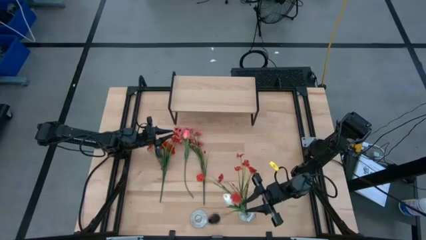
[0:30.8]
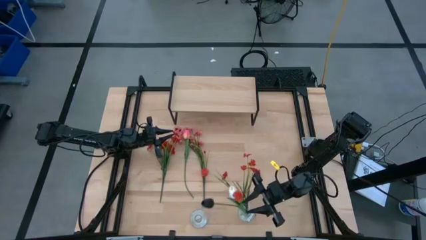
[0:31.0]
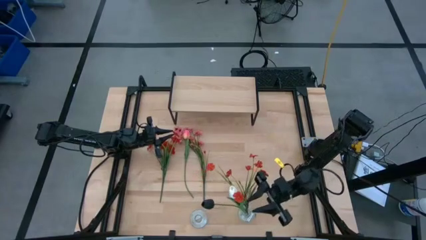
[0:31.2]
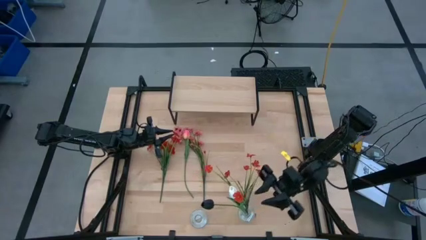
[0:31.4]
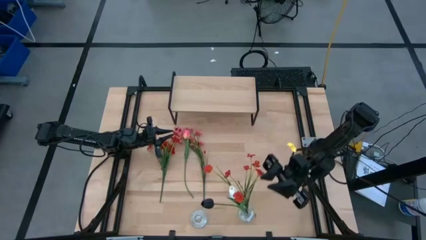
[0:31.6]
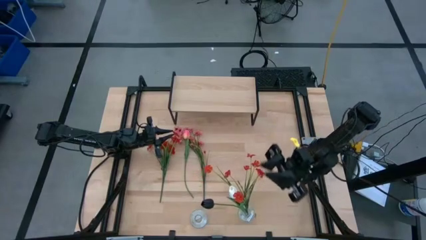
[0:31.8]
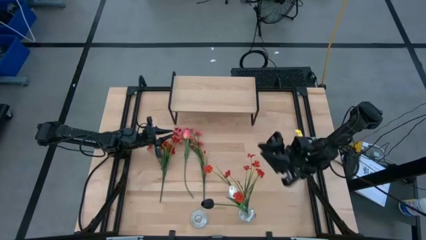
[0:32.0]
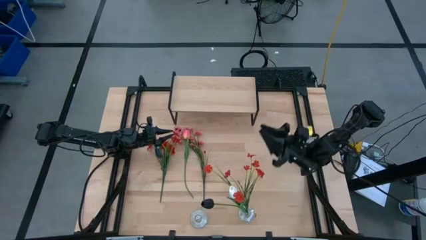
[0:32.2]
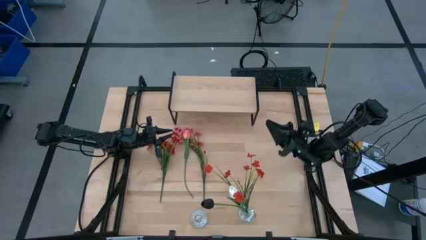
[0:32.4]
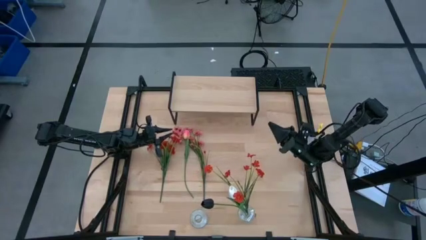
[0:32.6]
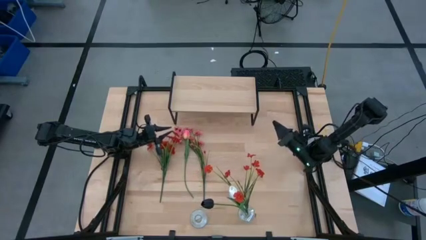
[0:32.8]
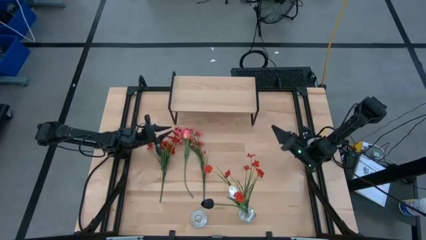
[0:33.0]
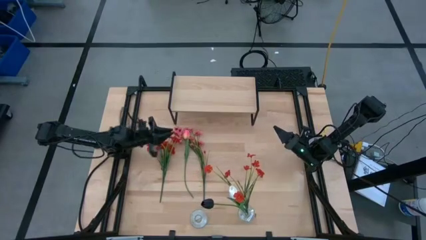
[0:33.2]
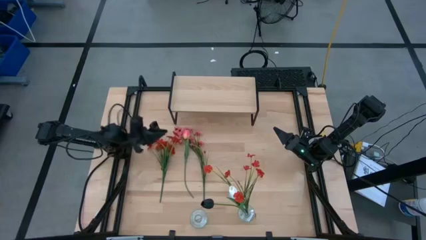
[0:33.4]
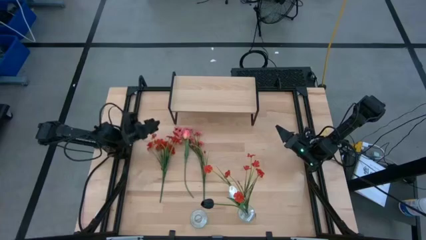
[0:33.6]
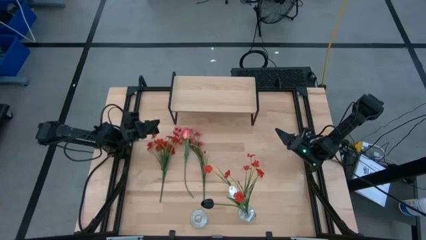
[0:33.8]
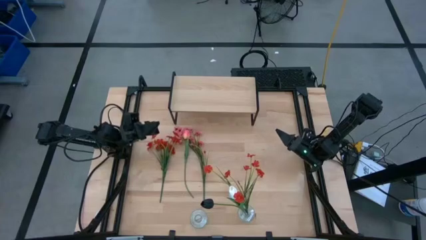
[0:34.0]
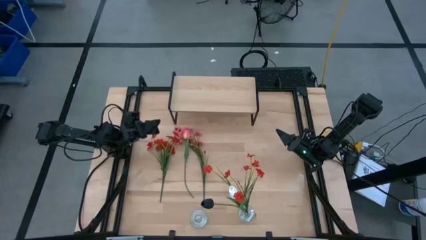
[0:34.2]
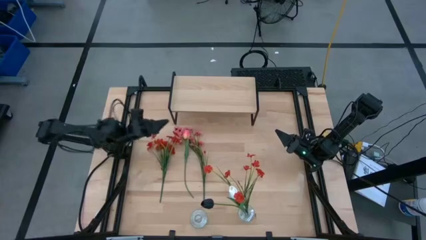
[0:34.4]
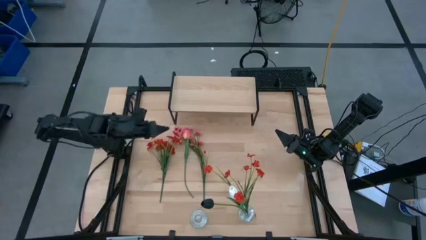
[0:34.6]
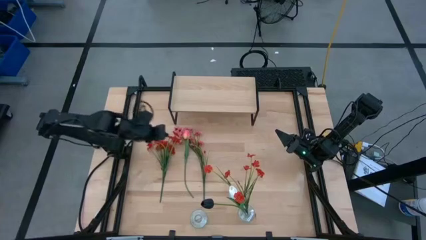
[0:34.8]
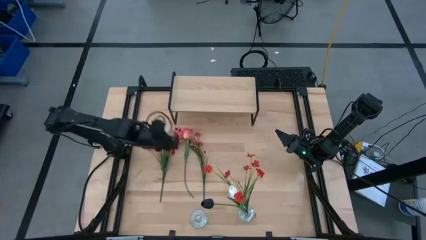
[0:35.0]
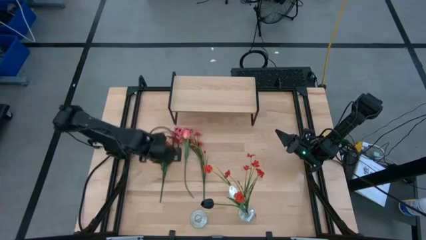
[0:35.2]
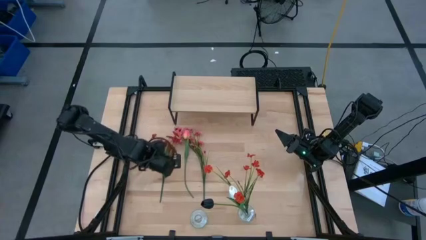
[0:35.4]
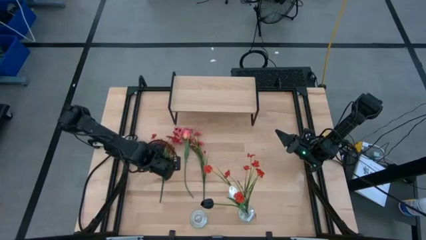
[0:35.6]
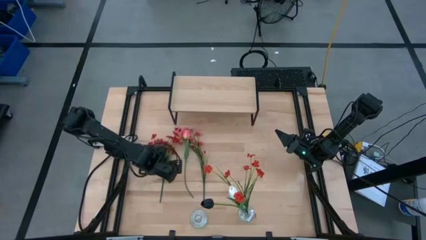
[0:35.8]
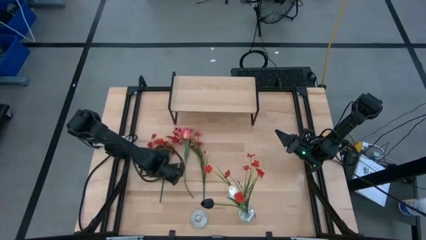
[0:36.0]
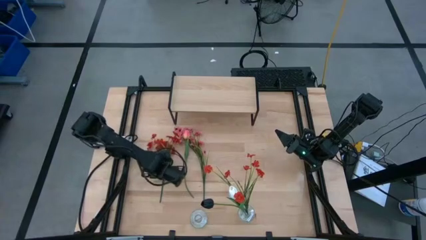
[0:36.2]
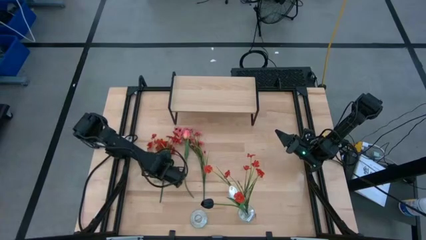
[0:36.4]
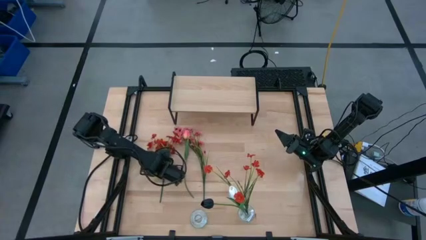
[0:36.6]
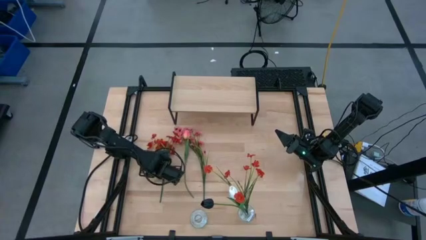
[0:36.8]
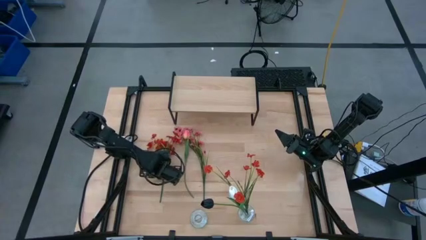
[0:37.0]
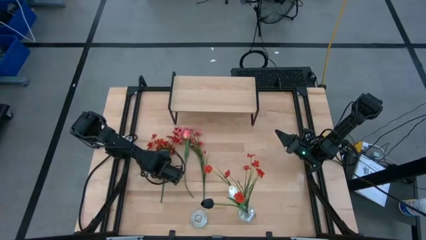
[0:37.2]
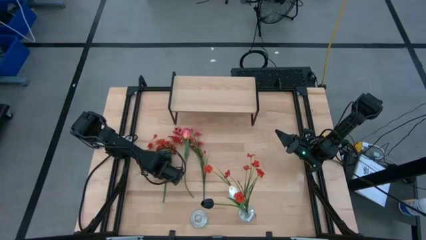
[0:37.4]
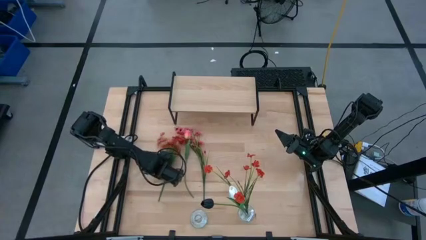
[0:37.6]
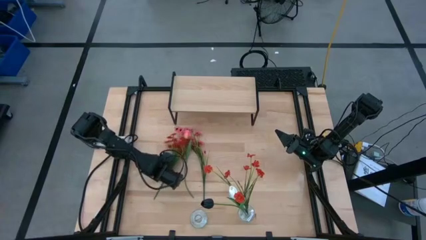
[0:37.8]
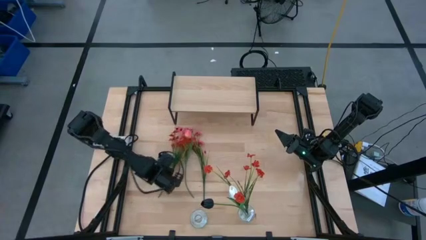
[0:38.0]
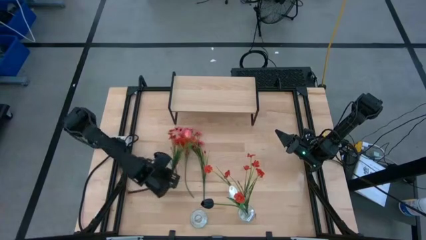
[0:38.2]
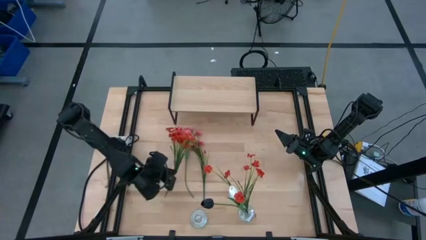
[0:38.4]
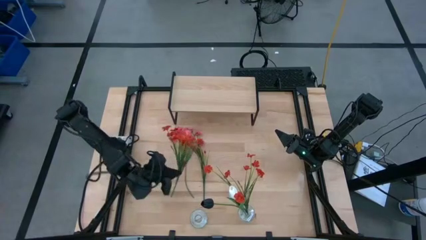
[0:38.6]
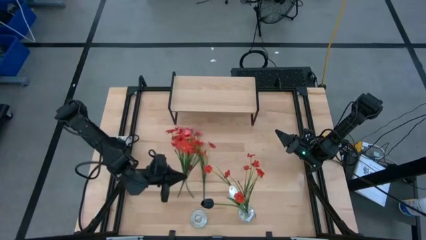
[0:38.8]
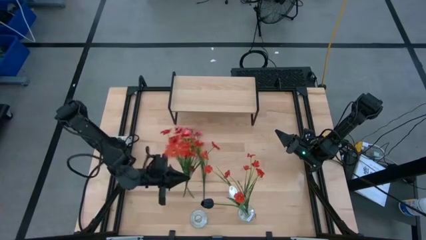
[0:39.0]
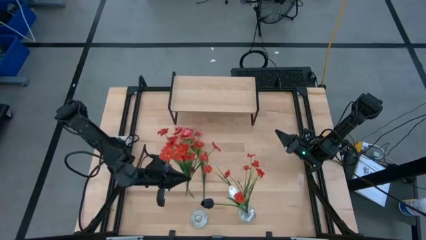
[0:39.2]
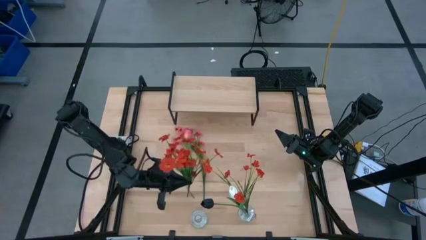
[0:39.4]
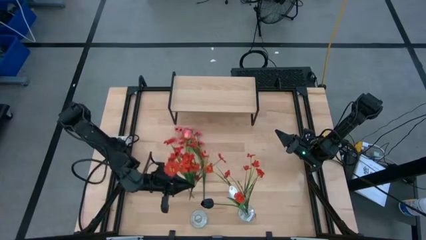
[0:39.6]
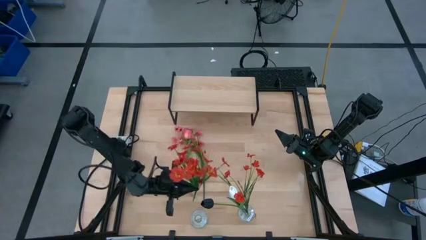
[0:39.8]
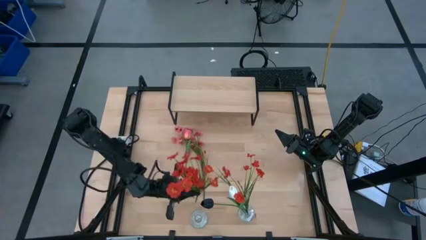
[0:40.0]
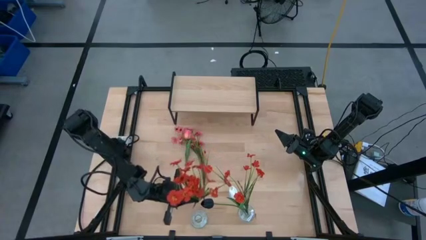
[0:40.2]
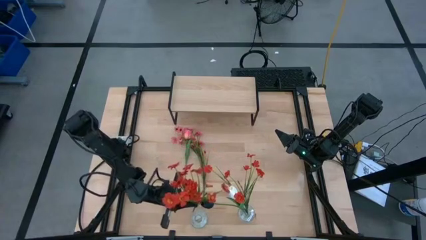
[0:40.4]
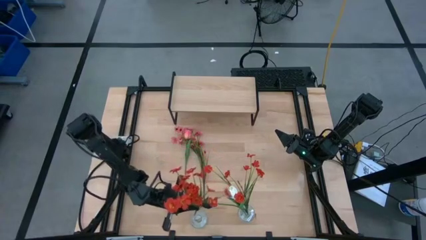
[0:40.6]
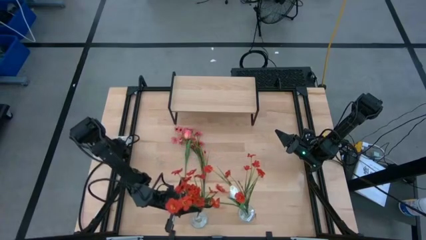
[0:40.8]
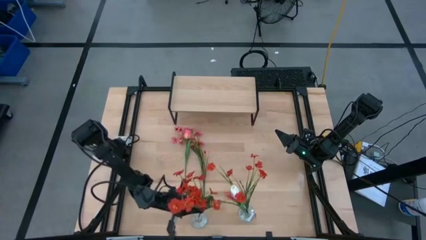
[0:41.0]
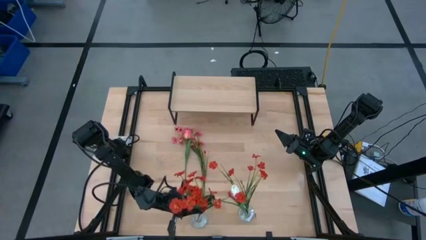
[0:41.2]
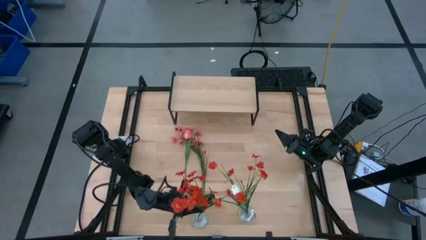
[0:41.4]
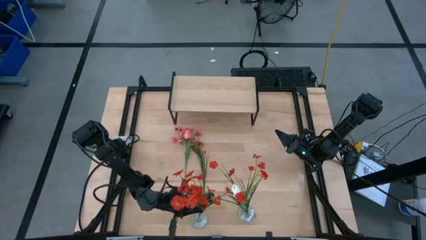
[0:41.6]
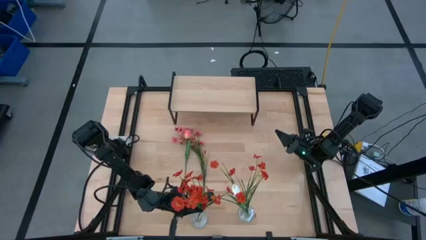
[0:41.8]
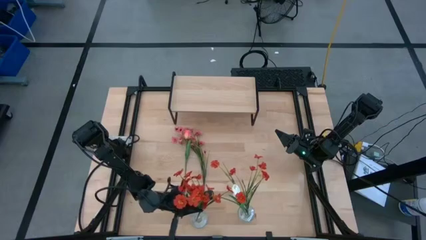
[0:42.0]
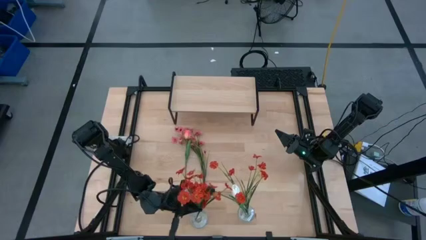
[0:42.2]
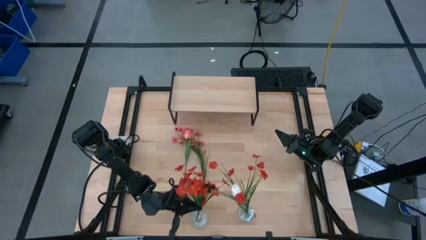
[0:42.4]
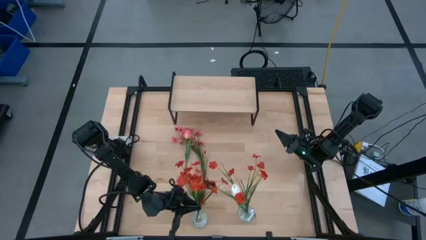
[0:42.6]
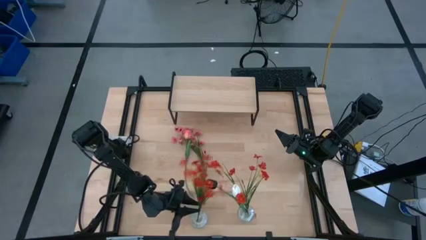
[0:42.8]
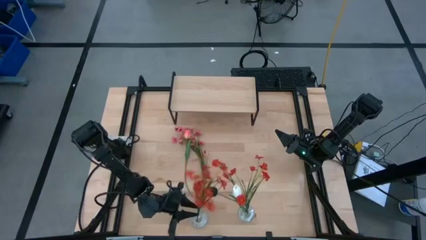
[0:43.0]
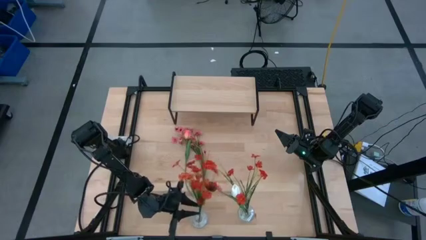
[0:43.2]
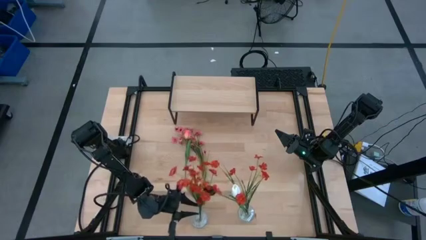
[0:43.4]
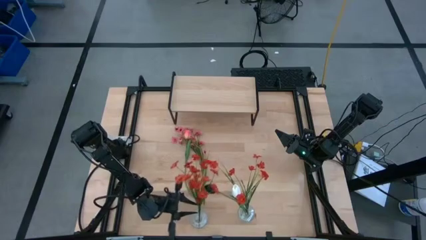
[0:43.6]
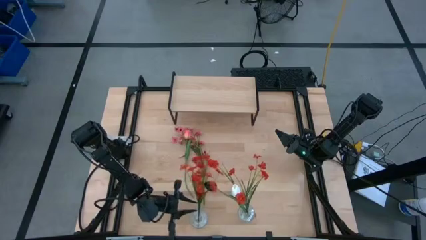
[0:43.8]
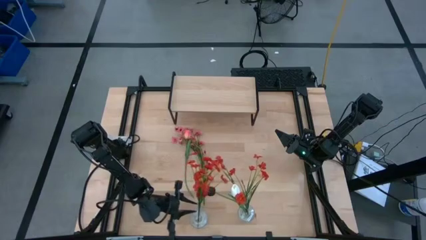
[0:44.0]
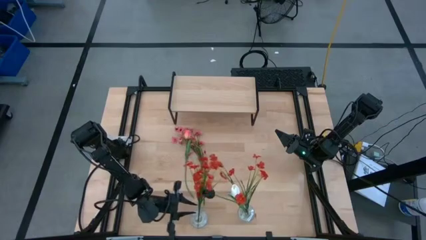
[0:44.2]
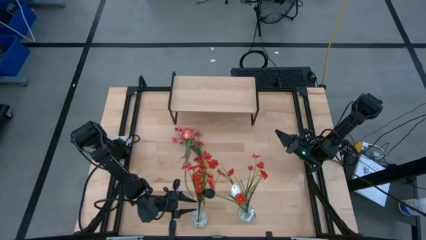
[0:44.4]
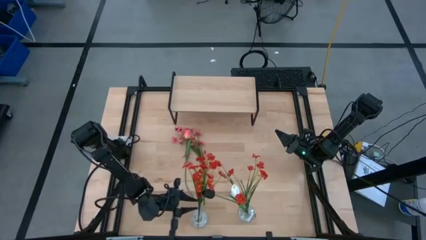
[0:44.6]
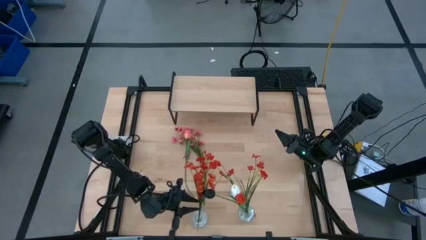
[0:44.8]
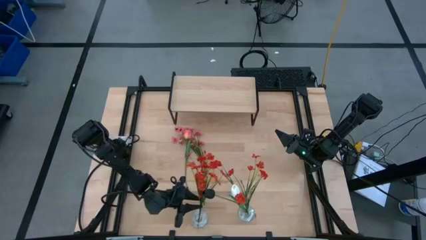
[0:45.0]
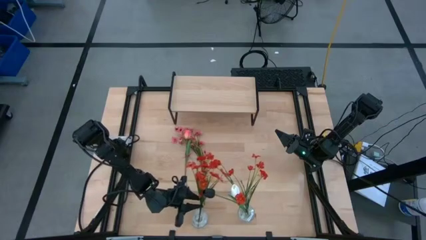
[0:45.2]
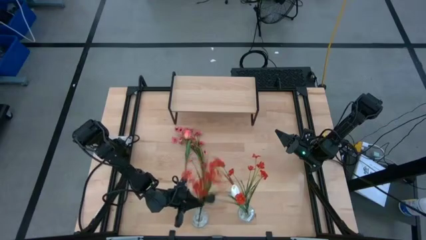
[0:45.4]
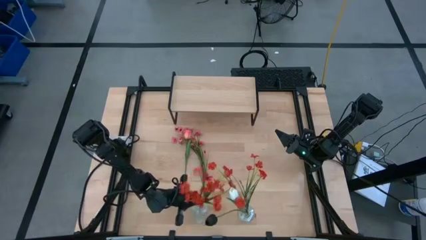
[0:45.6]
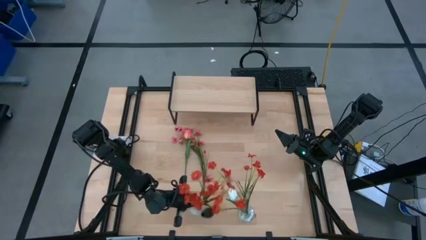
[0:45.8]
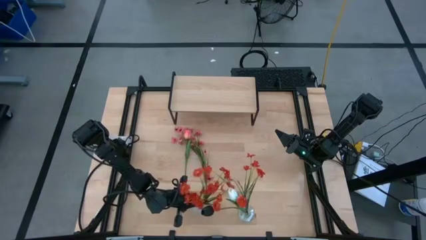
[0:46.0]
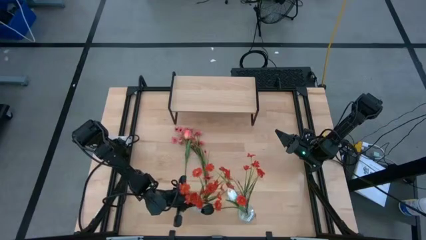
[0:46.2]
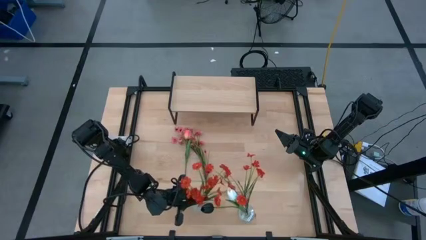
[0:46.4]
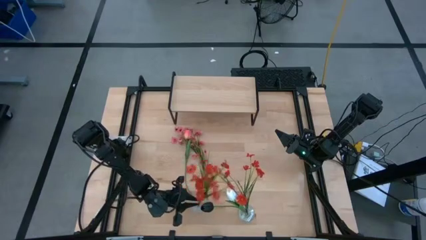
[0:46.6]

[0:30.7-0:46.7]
Task: Pick and place flowers into a vace then onto a shelf
Put the orange flowers into the left transparent vase
